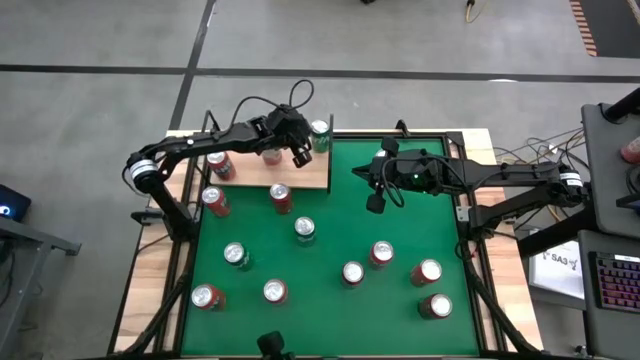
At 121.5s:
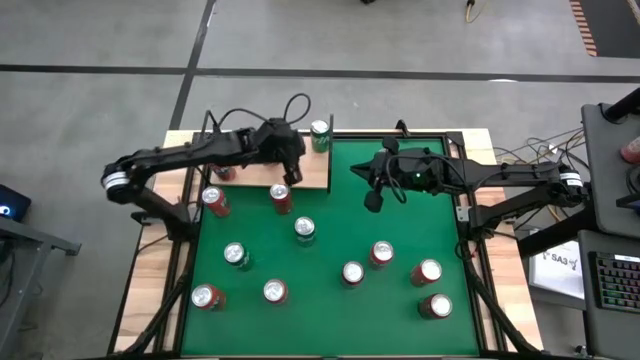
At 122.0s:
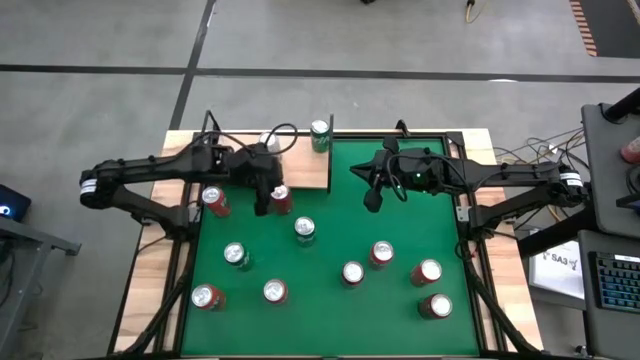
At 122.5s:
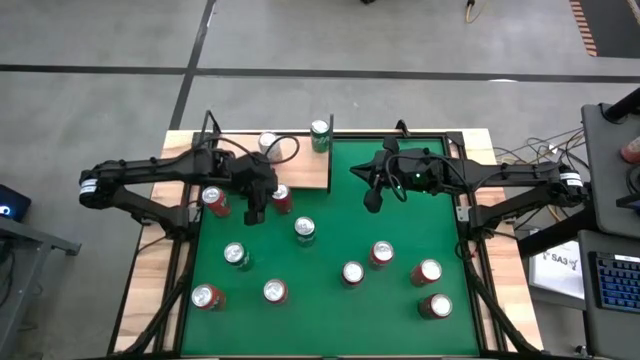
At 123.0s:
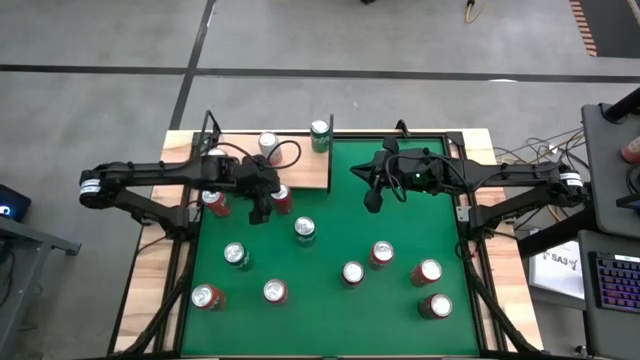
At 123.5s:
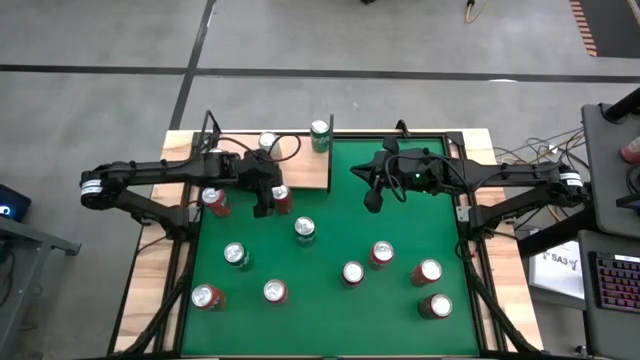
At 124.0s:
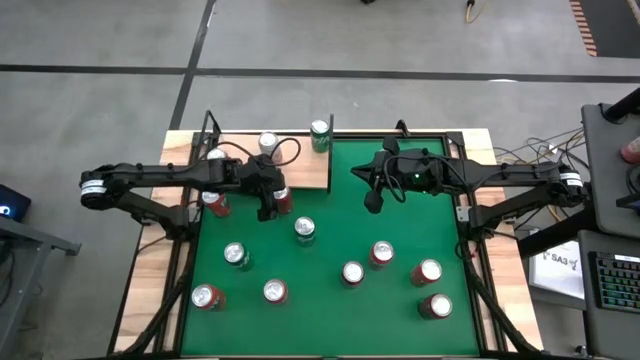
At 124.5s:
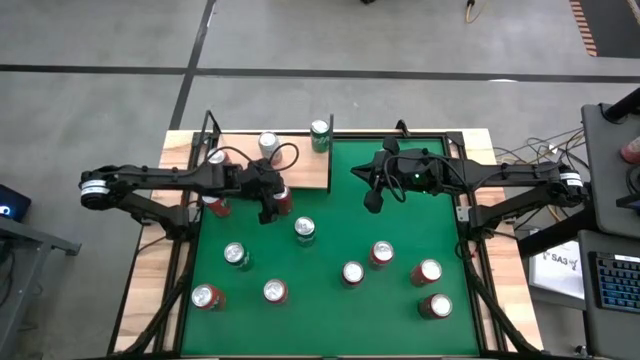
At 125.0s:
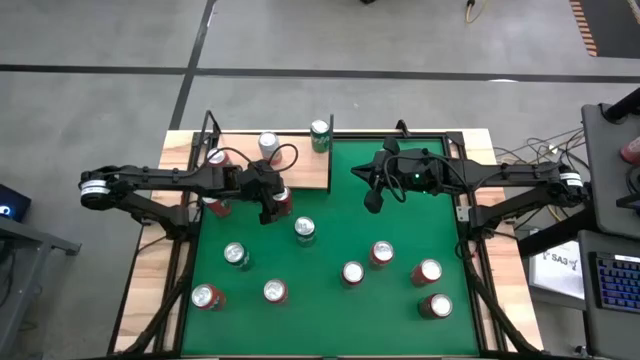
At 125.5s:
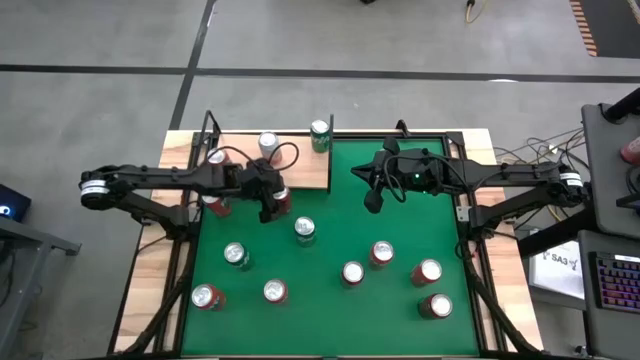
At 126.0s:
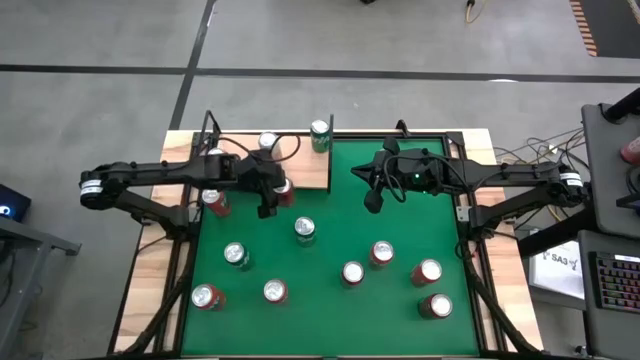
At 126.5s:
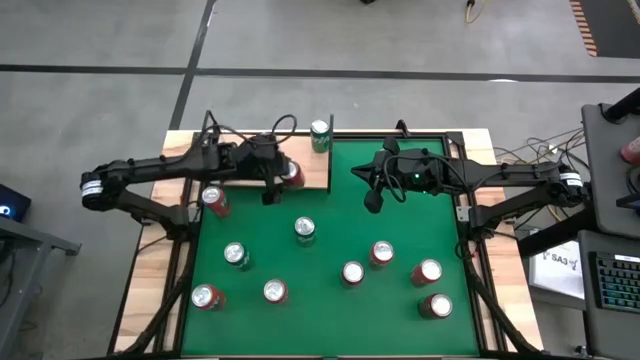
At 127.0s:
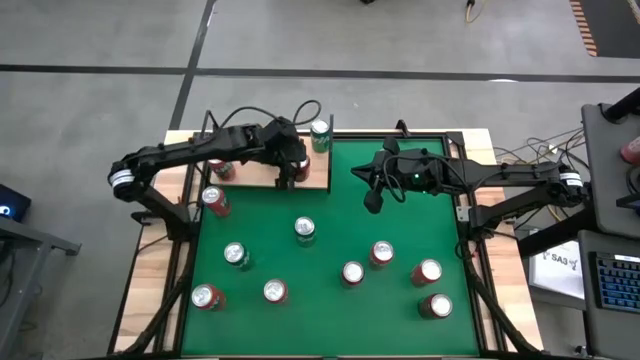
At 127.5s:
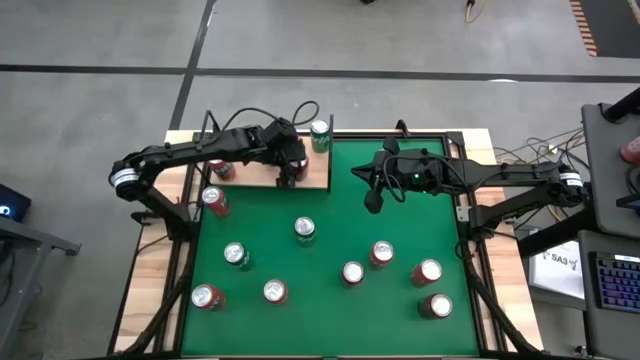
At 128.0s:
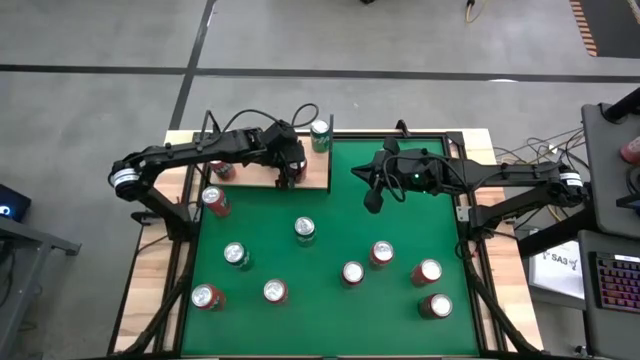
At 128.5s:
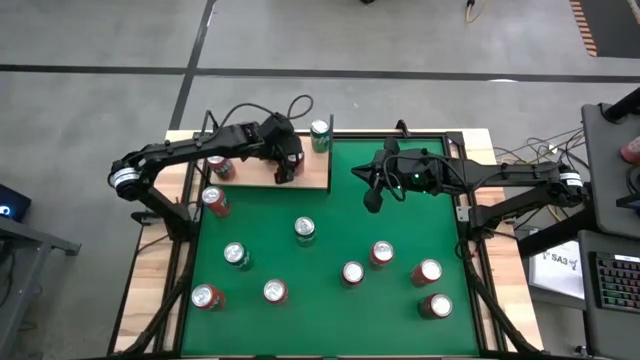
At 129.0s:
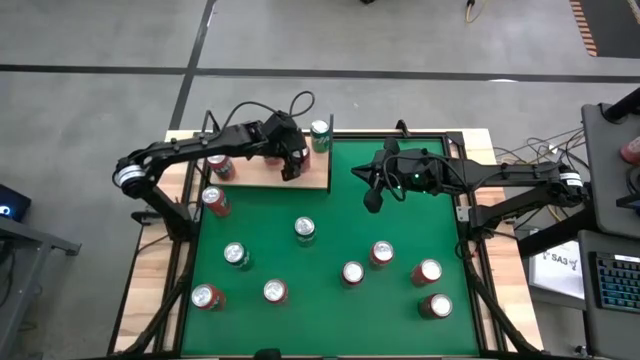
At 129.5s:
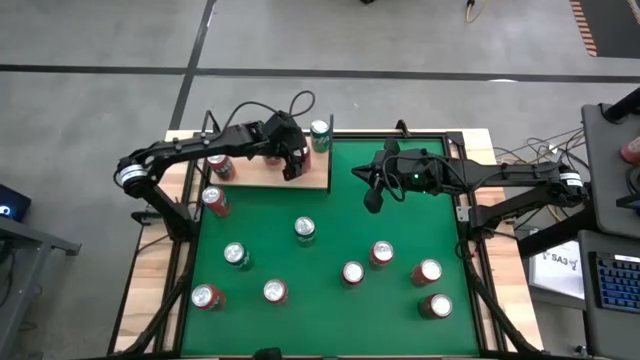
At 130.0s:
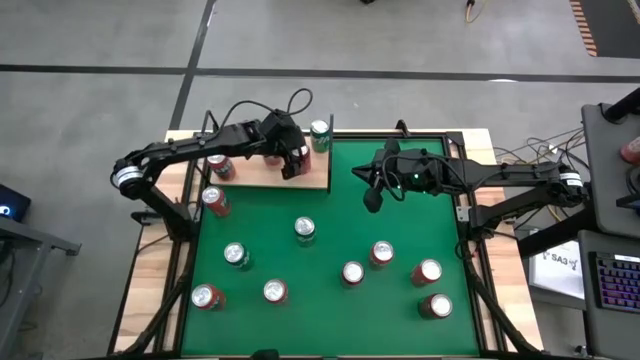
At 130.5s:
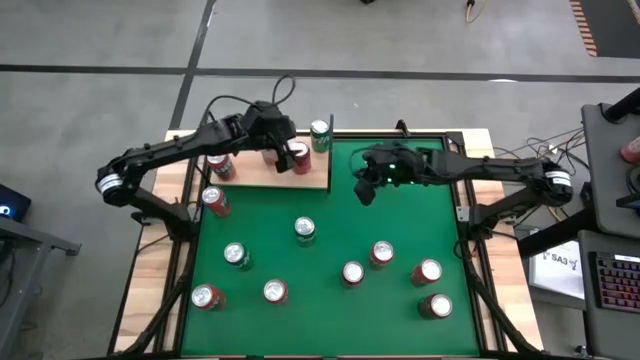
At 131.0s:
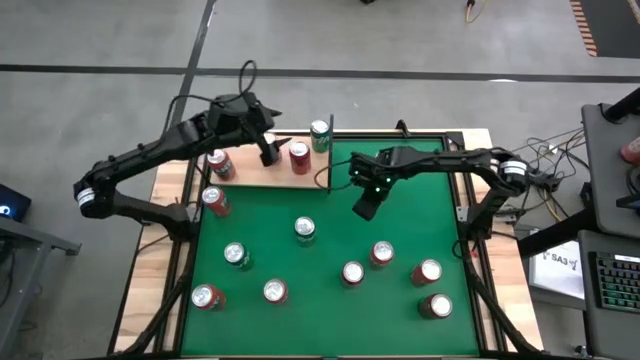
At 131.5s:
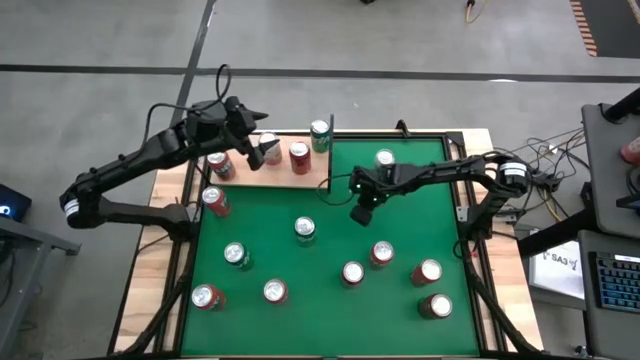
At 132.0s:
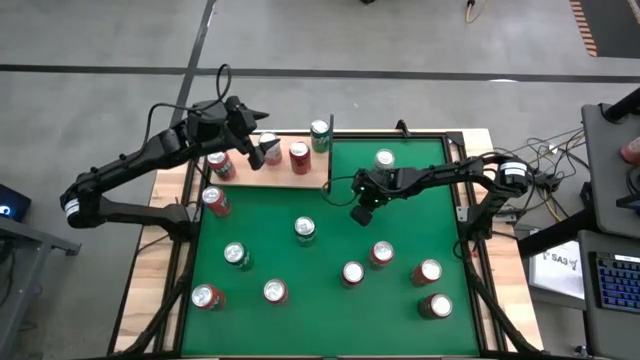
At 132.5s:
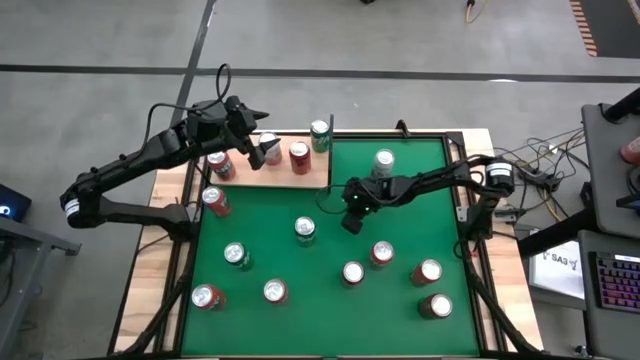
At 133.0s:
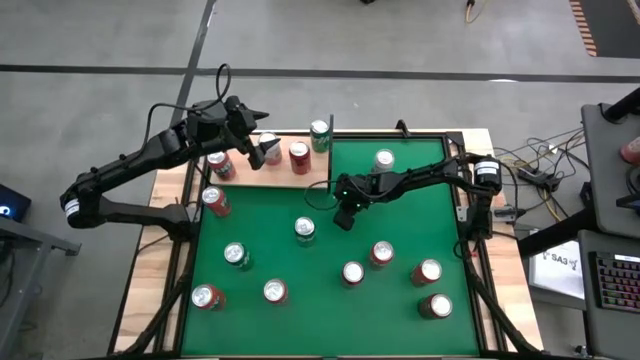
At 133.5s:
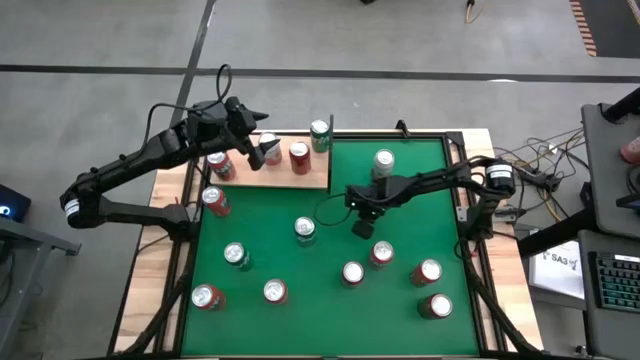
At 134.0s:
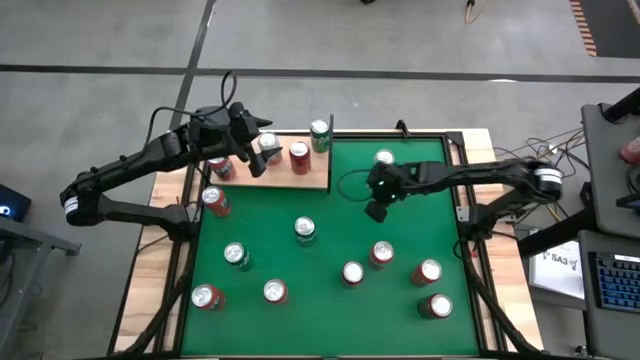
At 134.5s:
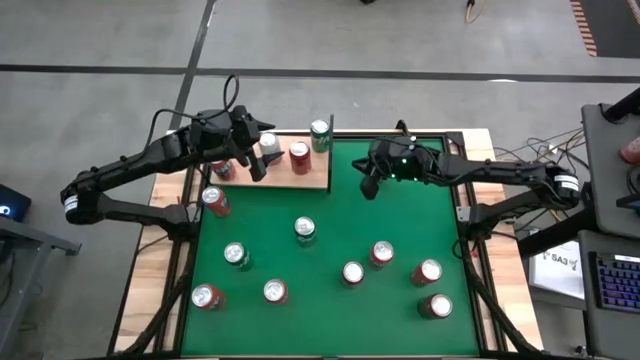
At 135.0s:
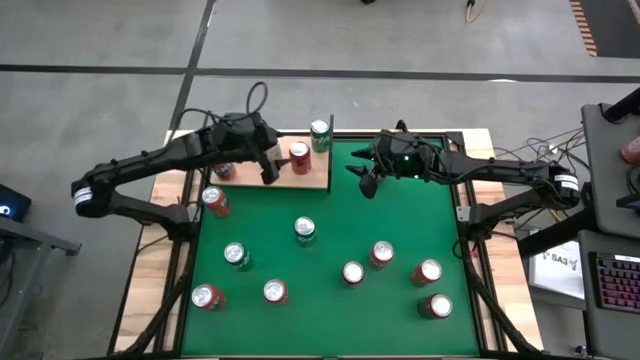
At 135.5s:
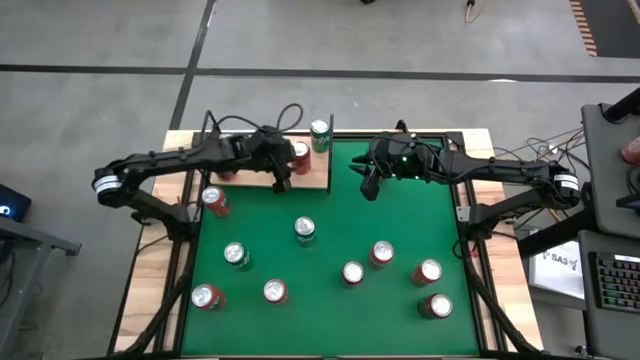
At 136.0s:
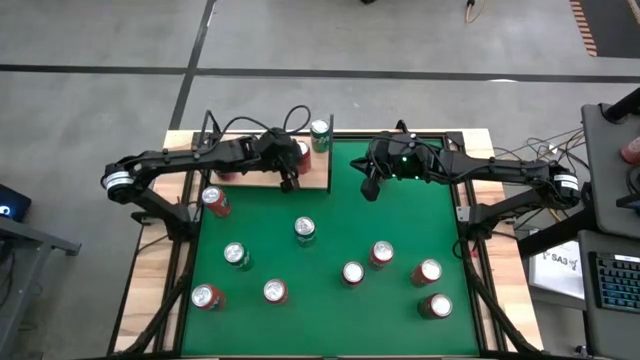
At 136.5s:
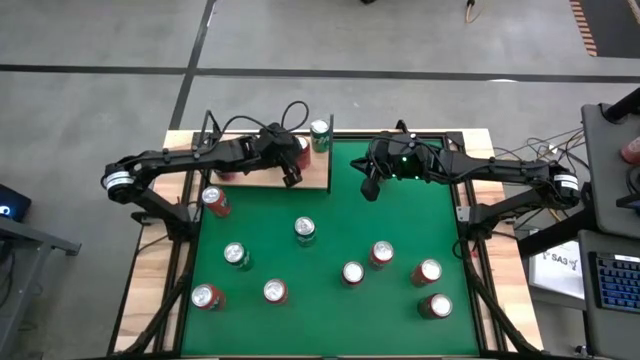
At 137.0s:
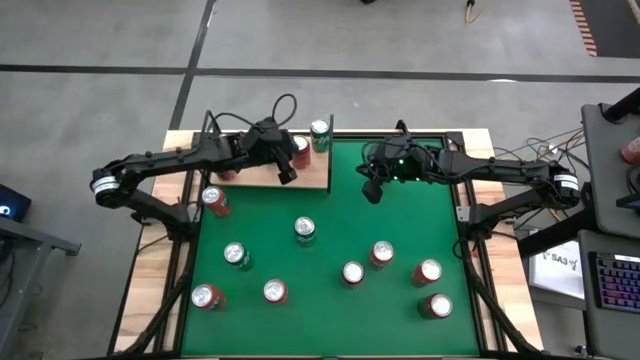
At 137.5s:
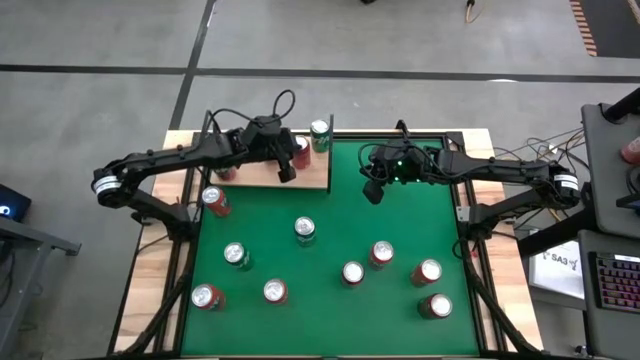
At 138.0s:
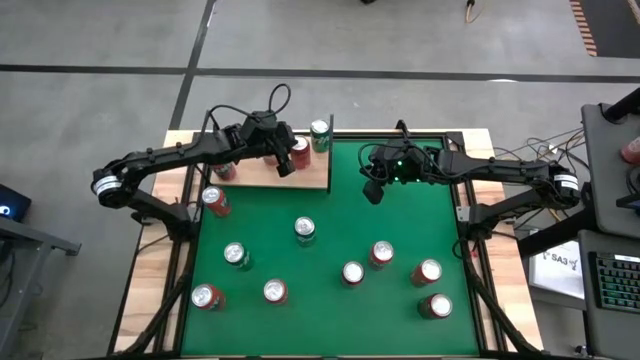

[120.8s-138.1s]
Task: Place canned beverage on shelf
Put the red-black soda can on the shelf

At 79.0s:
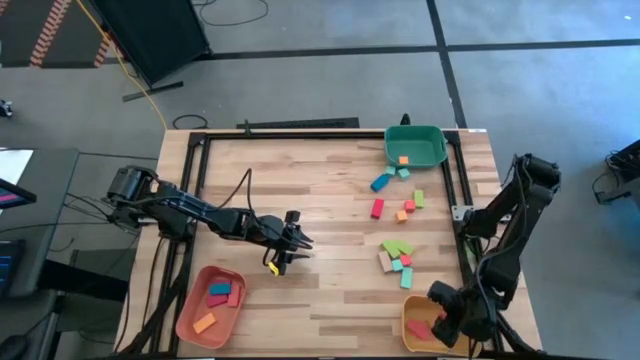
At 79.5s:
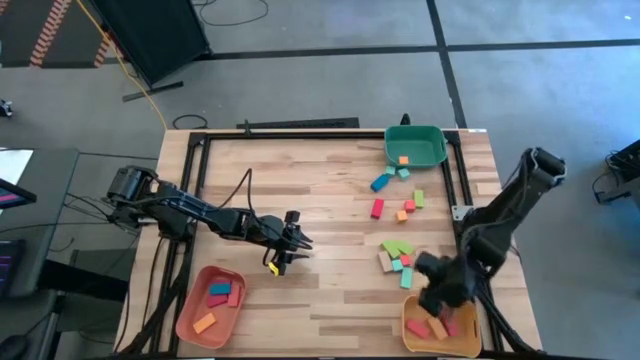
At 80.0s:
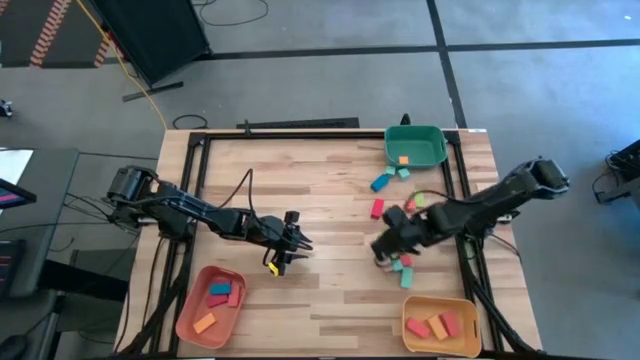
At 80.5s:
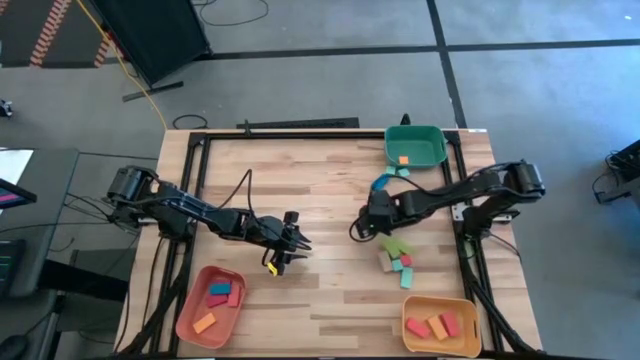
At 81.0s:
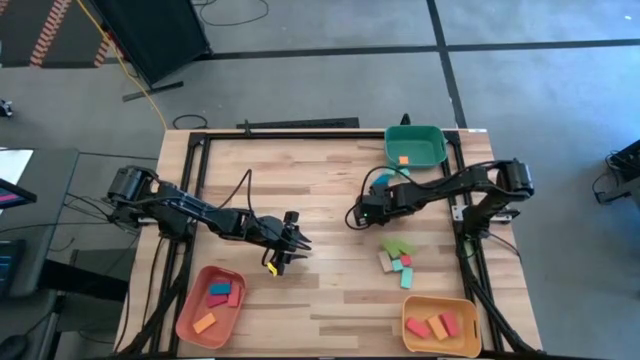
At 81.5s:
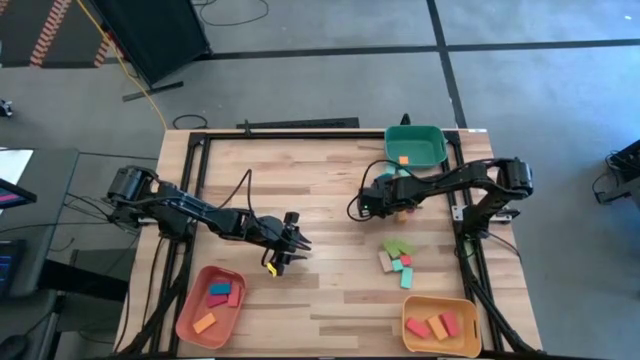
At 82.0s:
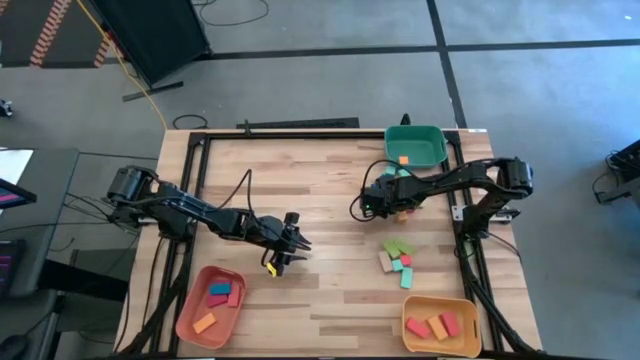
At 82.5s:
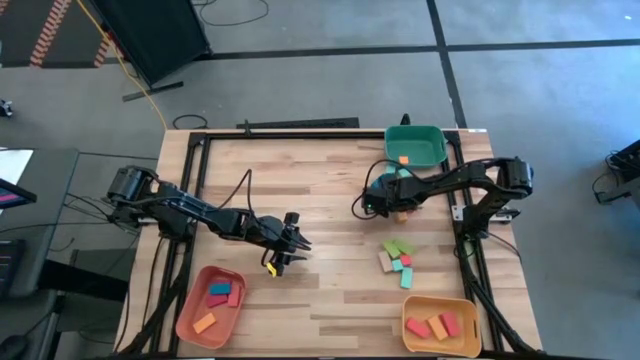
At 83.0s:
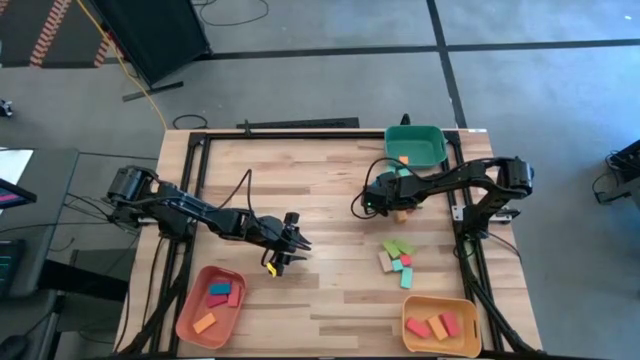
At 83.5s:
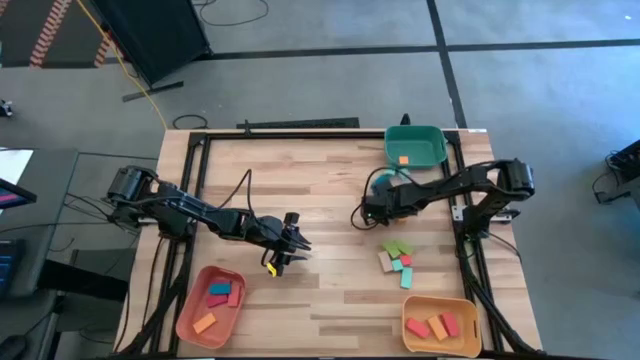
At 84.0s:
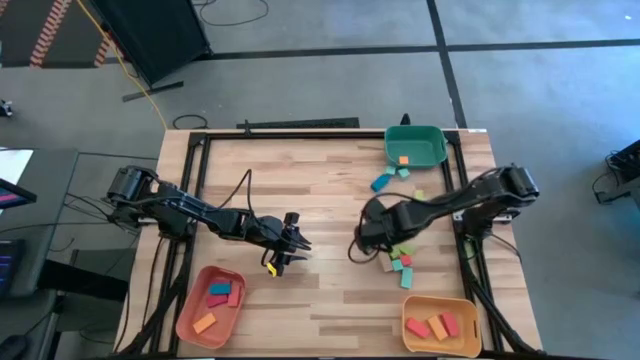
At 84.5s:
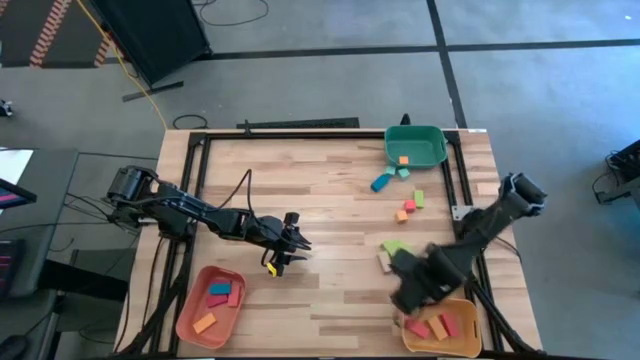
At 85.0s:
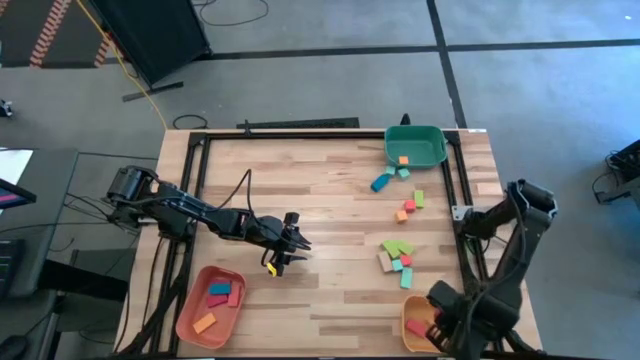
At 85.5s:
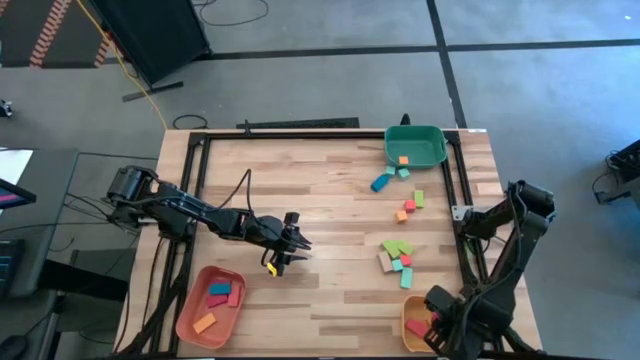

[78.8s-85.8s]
Task: Sort blocks by size
Put the large red rectangular block into the yellow bin
